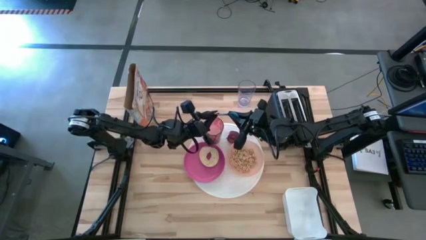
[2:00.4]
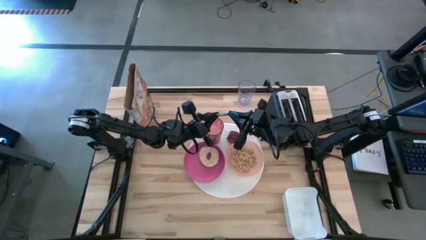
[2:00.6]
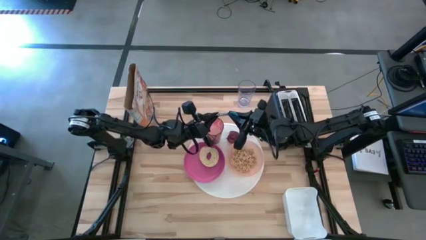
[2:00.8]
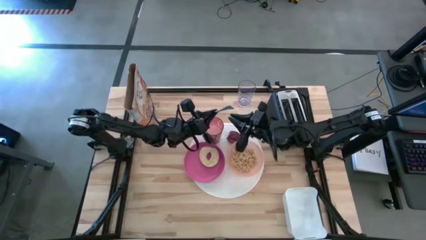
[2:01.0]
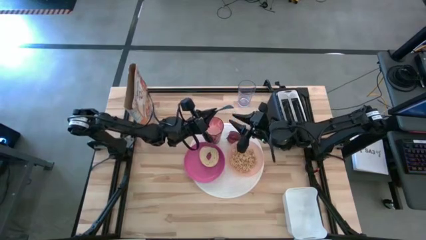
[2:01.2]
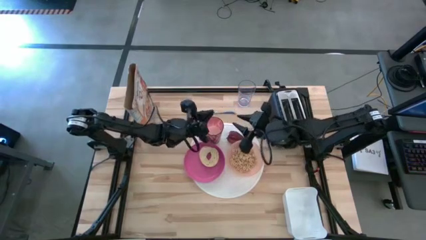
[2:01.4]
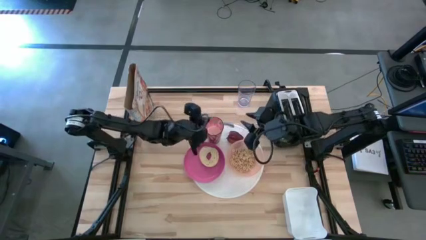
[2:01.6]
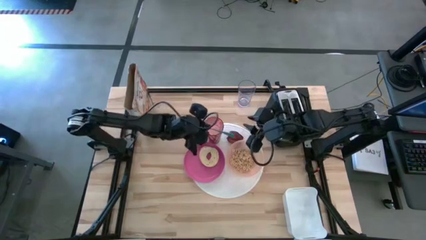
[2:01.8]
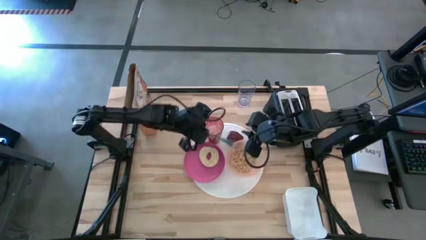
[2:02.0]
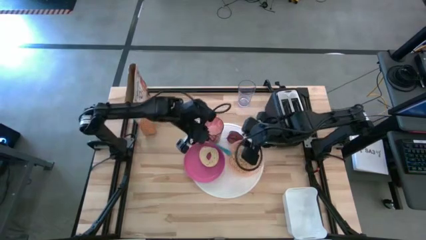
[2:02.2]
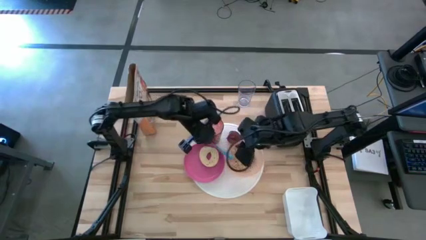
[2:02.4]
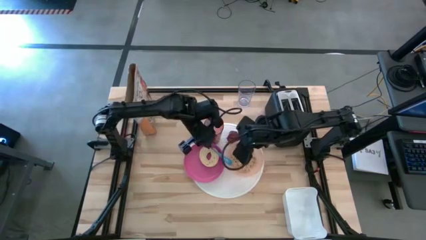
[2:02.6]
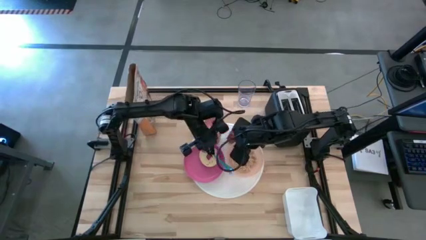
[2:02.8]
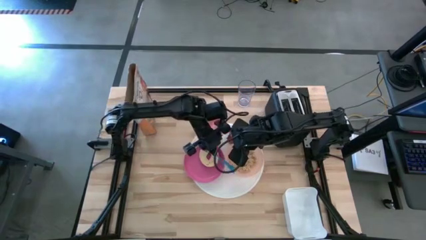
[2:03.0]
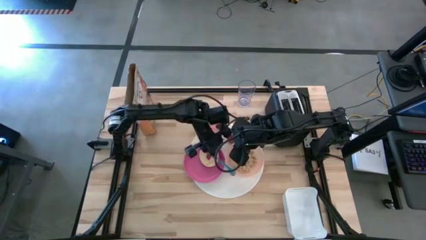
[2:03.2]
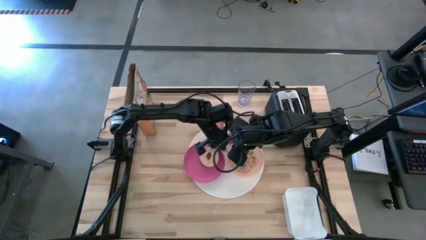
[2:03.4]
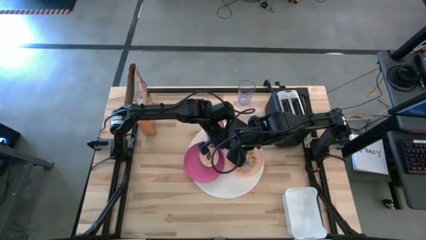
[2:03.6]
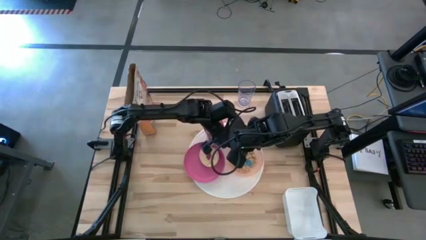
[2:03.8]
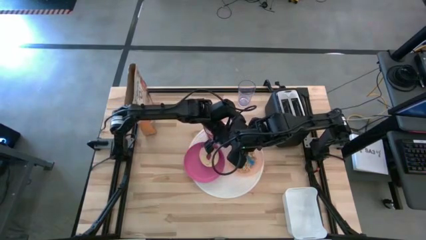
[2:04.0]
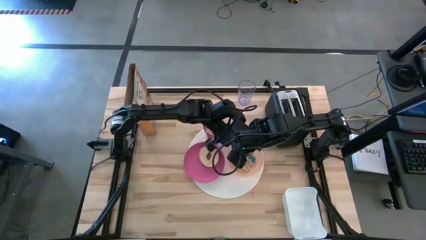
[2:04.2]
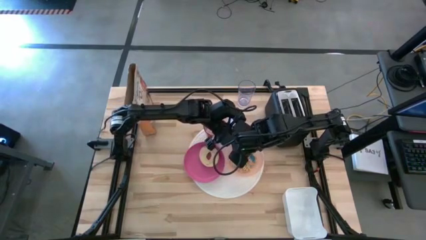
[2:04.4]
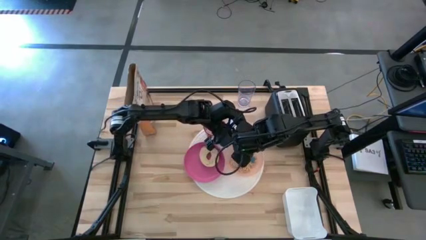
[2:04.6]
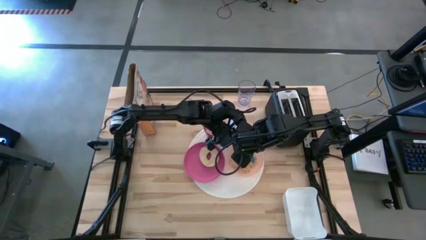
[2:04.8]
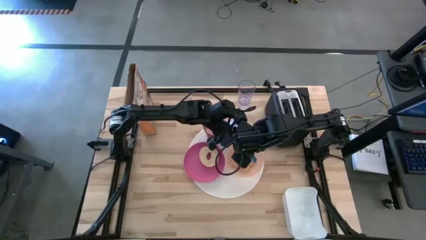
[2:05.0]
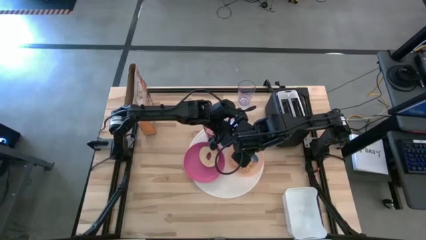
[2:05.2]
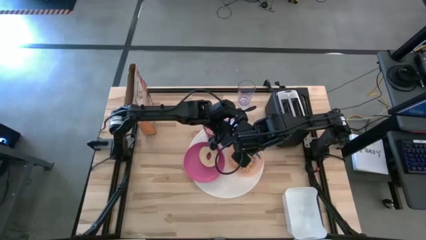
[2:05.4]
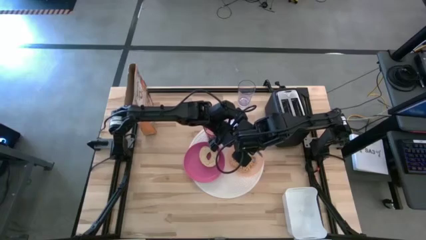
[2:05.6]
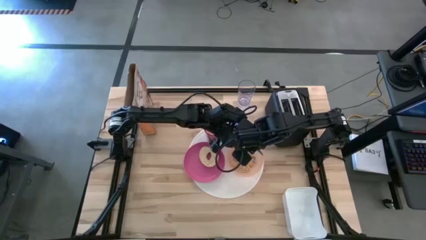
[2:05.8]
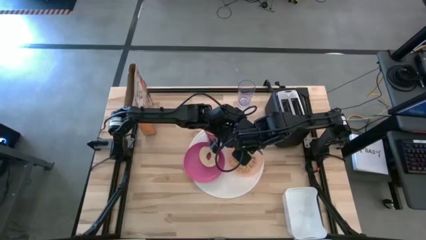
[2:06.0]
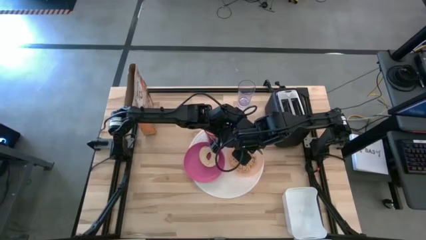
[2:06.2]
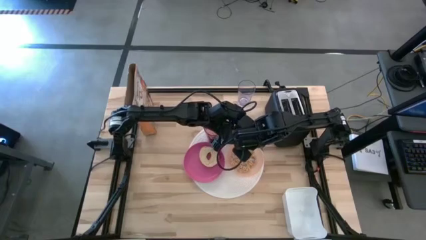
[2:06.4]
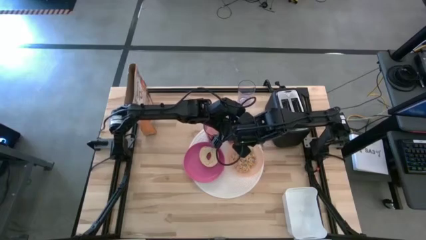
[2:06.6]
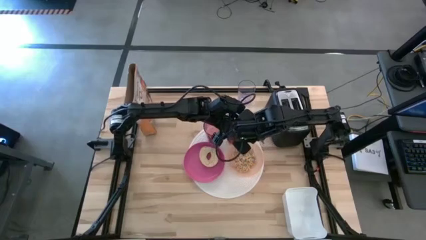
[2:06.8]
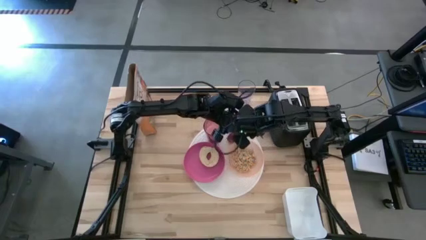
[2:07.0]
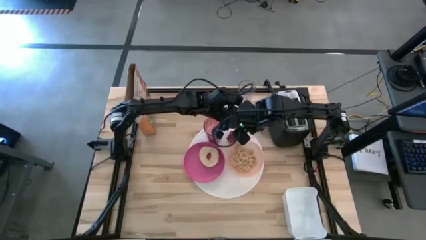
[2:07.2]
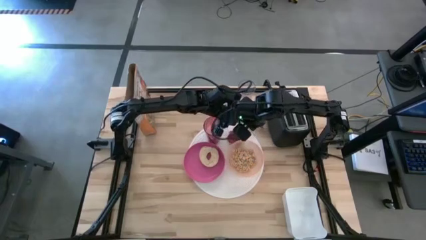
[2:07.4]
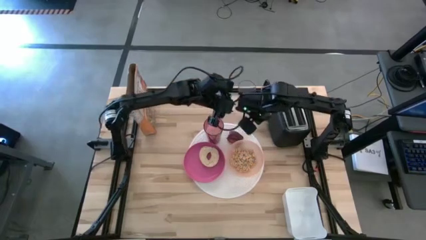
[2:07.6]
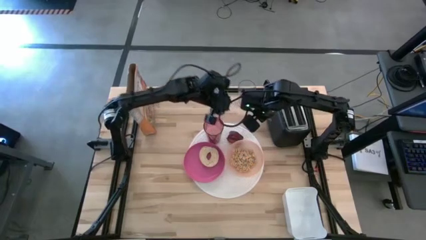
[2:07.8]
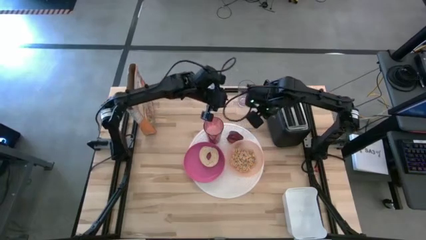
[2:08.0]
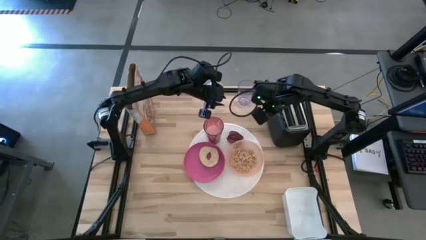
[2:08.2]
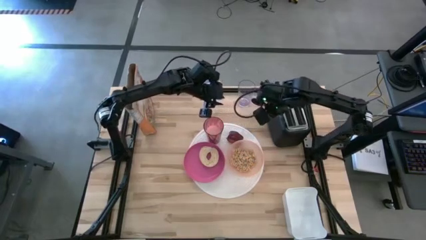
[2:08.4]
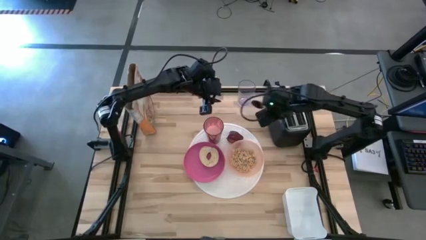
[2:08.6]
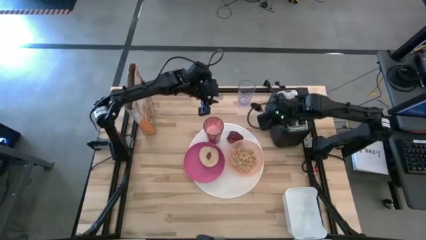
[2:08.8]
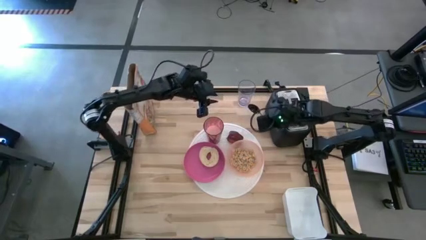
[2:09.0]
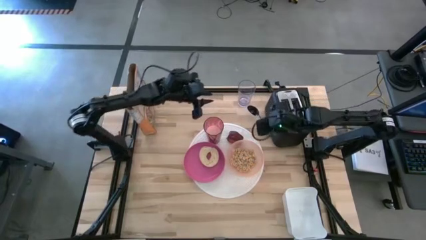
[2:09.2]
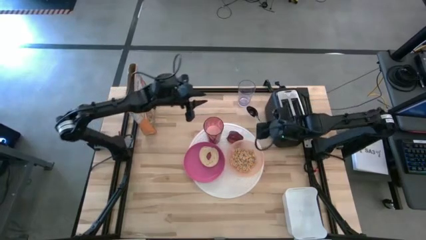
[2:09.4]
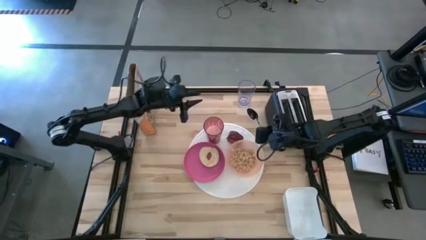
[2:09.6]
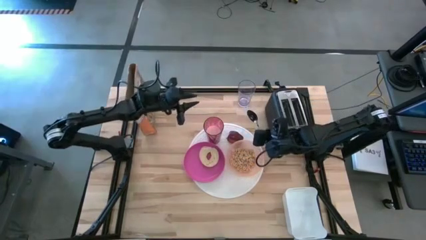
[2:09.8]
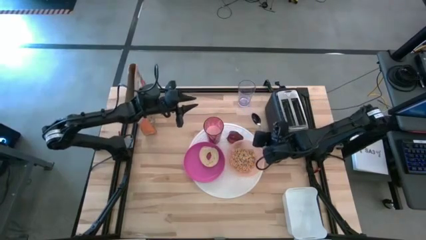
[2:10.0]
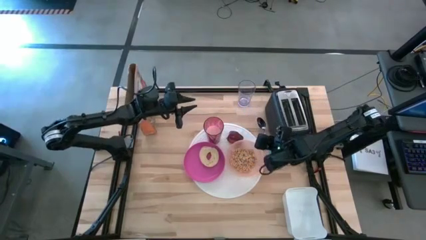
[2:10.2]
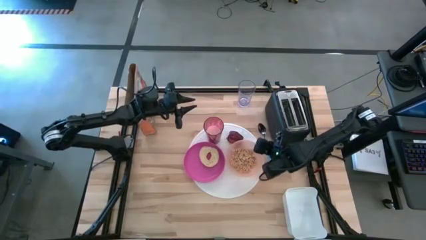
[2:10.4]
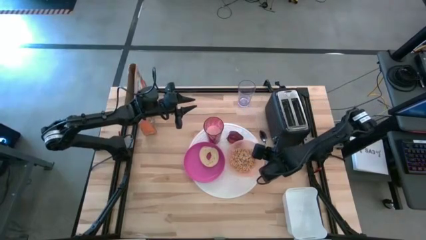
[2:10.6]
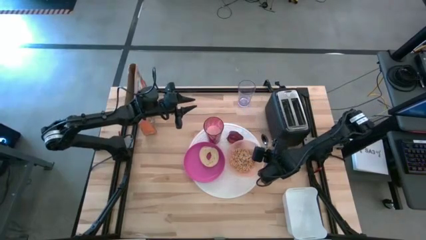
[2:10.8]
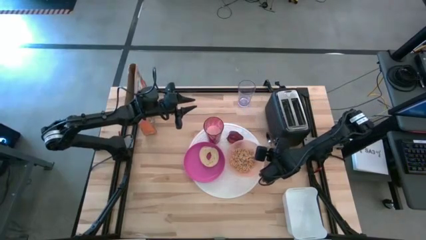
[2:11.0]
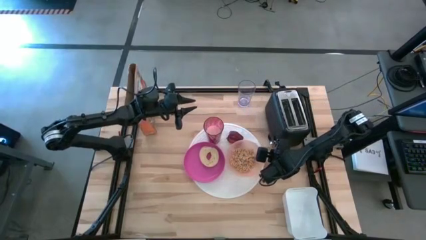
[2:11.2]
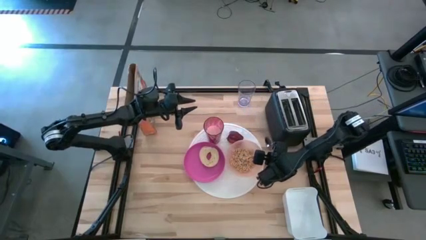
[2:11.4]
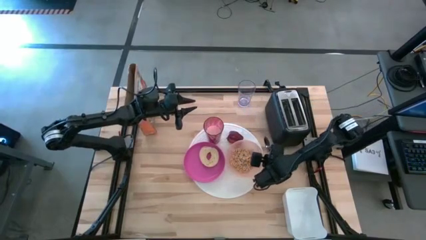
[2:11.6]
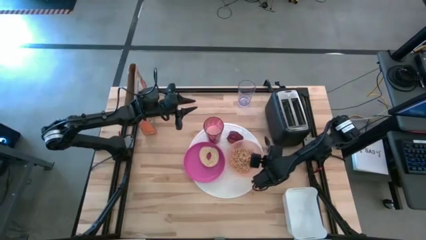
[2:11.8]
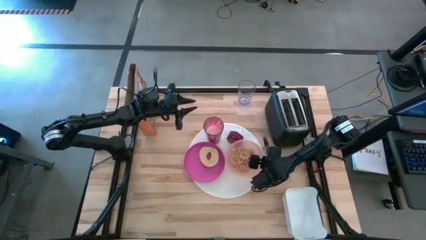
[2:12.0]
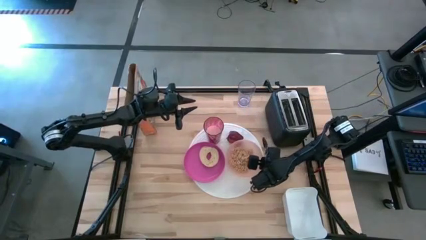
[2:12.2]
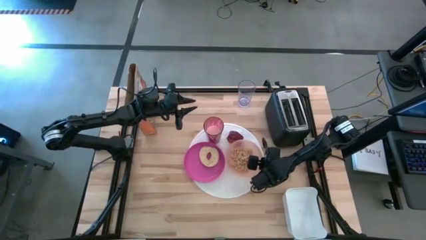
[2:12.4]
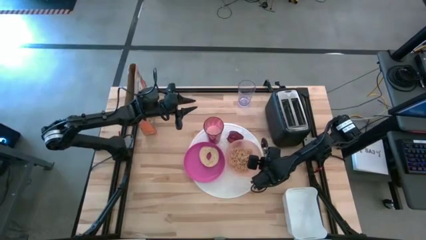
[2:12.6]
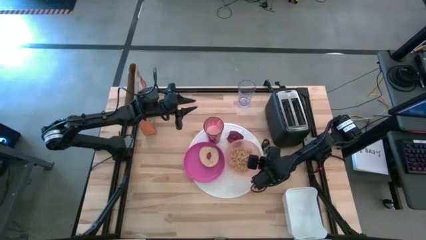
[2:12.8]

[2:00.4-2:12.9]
Task: Arrange a breakfast setting
Put the blue spoon on the white table mat right beside to the light orange bowl
